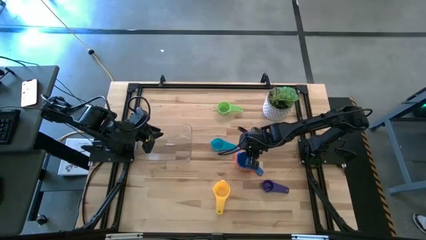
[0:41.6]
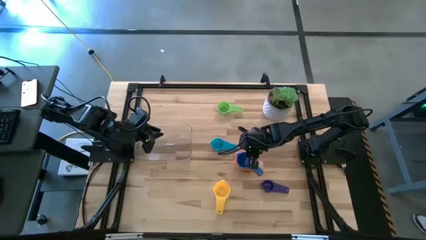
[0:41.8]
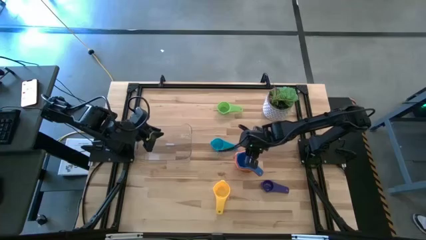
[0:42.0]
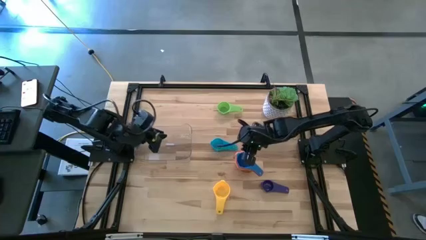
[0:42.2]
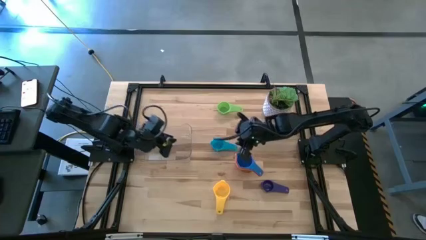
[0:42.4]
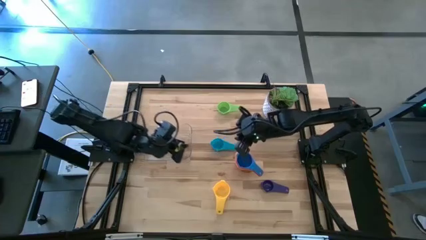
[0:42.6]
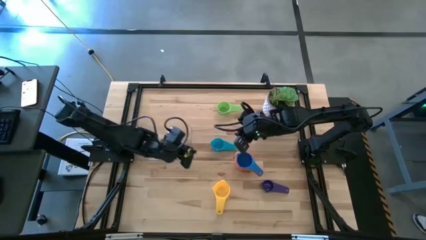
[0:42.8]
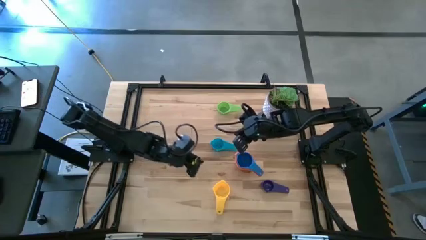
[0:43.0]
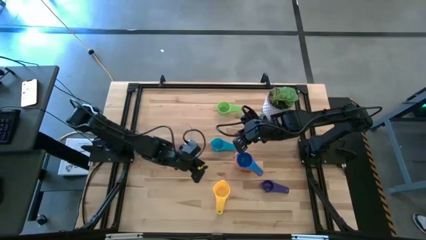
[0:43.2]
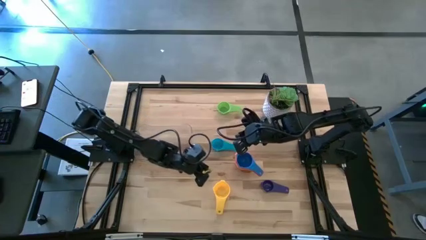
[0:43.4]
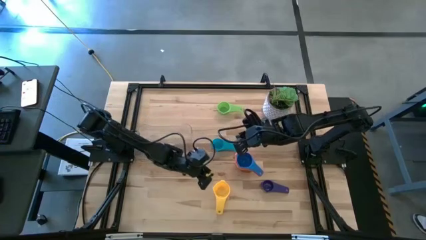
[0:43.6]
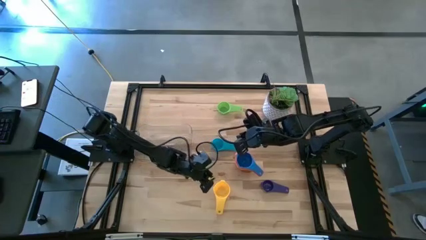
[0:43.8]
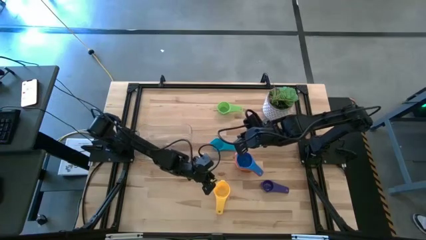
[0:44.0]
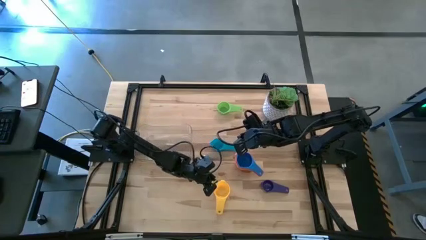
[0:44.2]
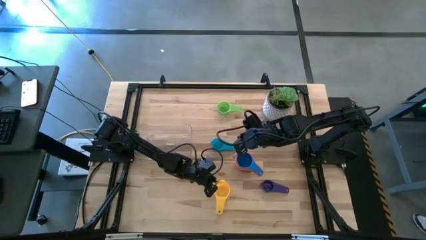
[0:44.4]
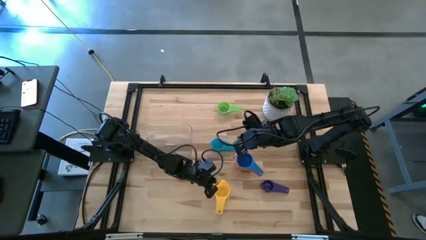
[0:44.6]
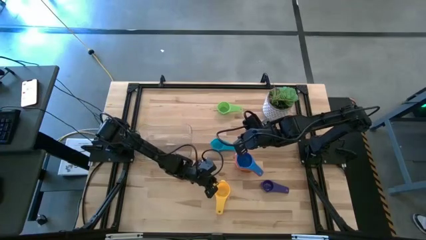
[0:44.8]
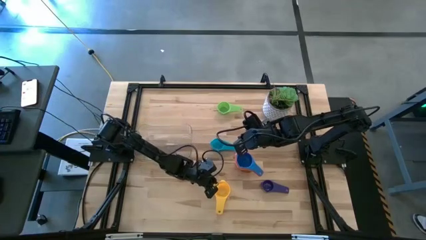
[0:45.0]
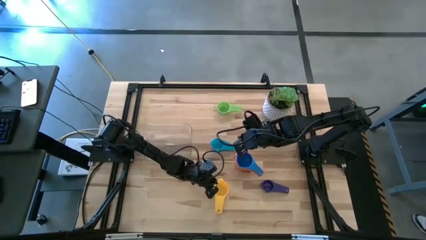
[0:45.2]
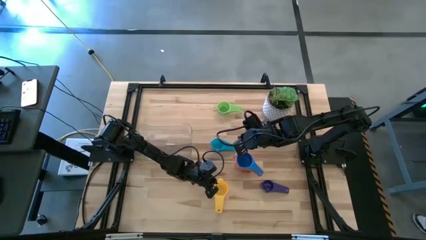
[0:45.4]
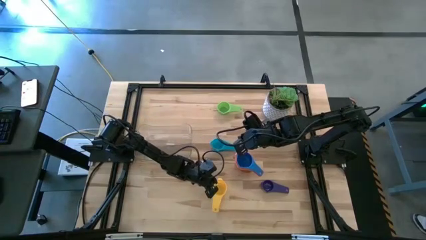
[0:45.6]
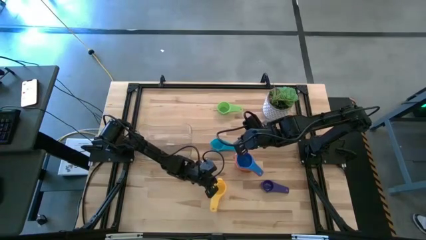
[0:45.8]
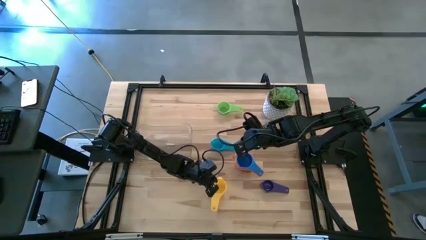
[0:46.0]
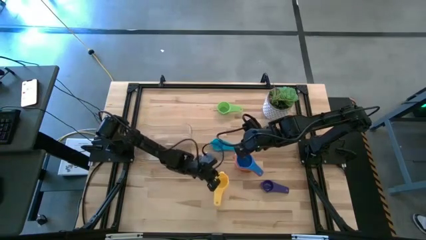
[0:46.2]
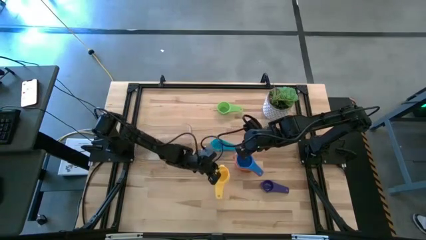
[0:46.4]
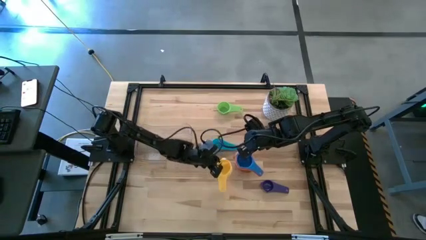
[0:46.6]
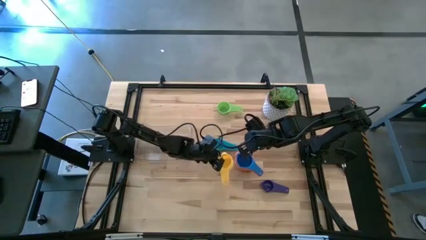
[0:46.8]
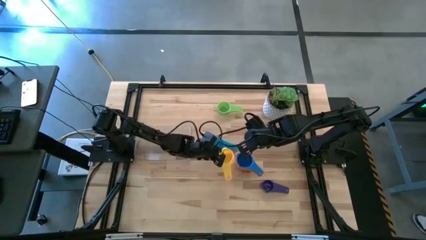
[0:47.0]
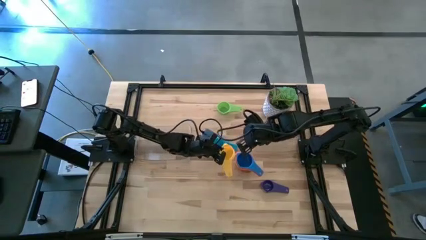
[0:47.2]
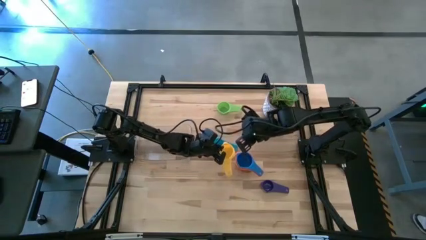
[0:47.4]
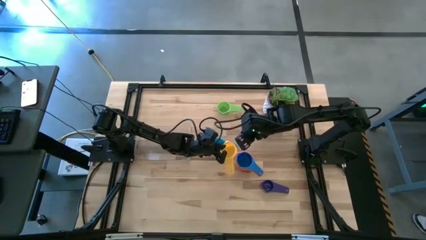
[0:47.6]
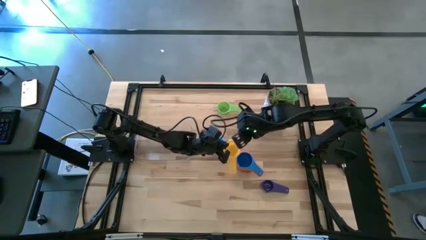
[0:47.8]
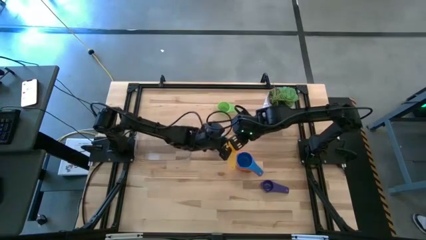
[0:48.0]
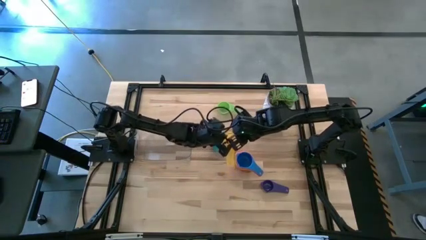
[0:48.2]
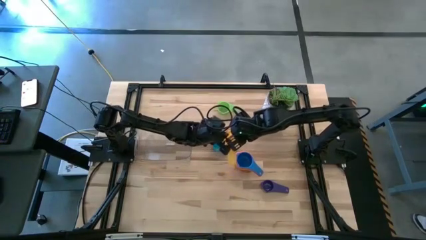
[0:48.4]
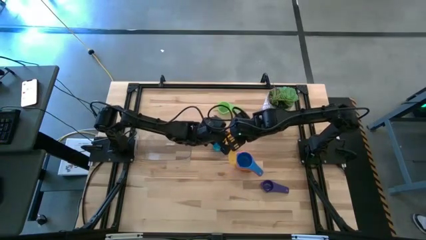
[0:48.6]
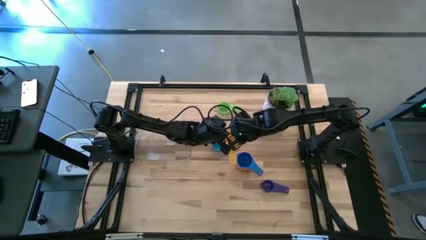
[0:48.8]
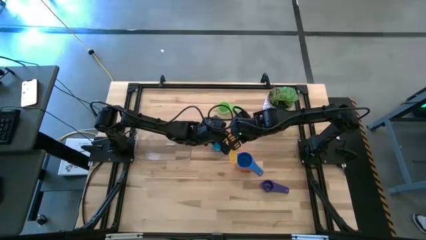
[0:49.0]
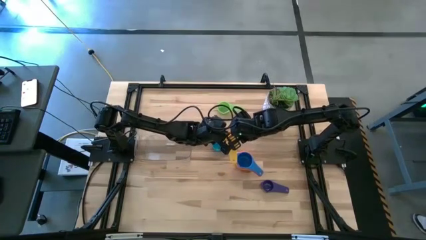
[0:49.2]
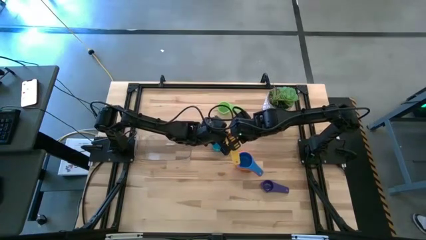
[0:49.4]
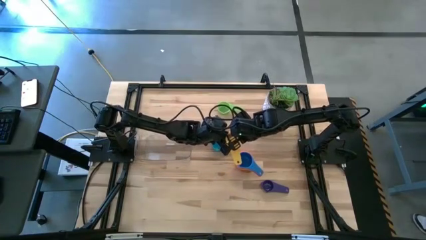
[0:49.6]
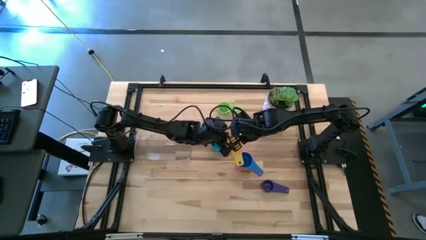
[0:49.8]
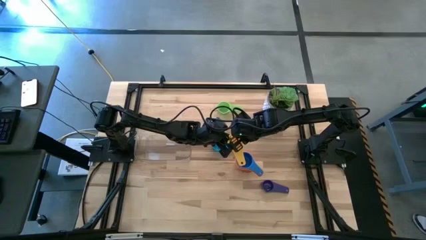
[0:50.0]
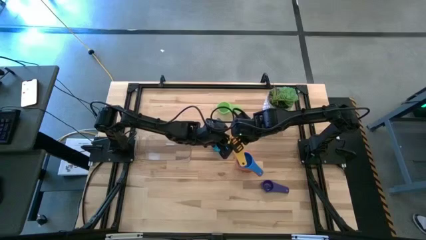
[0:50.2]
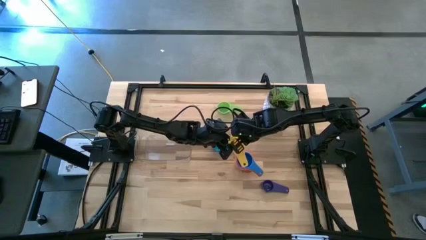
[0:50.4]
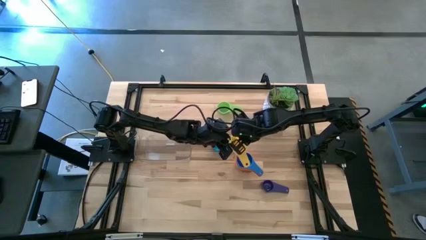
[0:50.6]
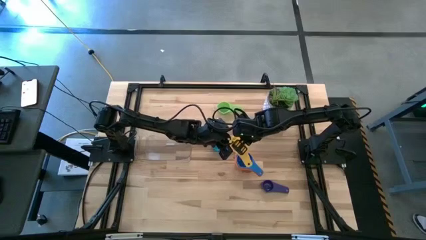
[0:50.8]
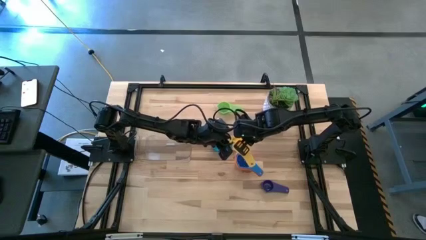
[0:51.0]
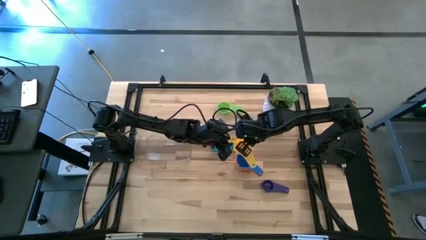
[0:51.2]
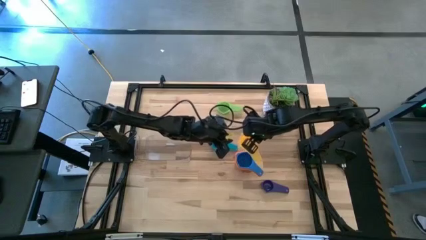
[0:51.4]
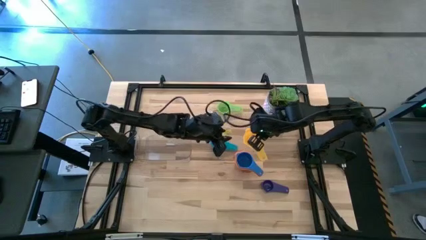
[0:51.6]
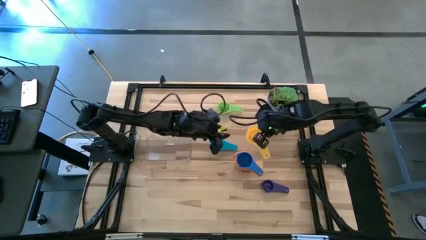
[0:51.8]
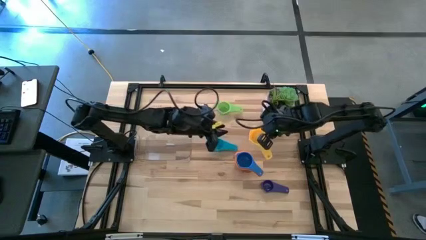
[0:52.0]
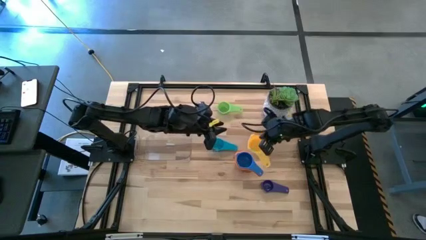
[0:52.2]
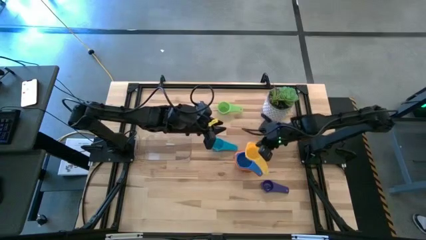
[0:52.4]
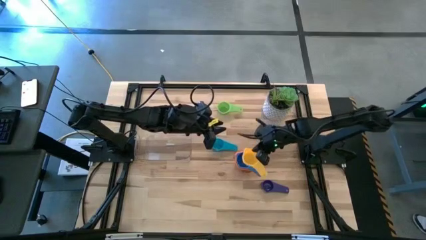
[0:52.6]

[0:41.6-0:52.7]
Task: Nest measuring cups in basket
Stack the yellow measuring cup into the blue stacked measuring cups
